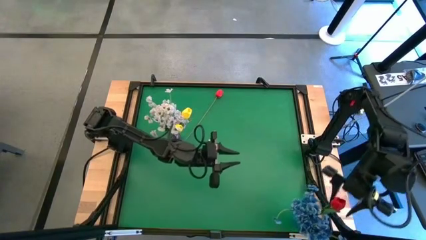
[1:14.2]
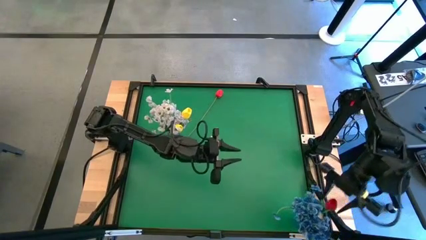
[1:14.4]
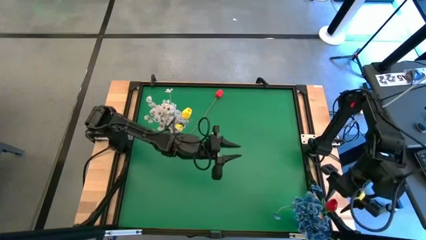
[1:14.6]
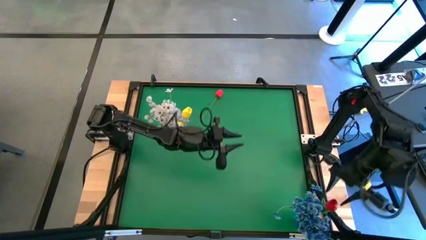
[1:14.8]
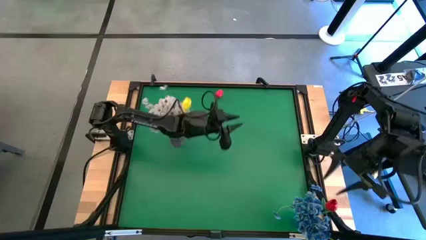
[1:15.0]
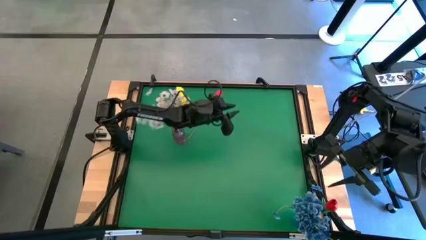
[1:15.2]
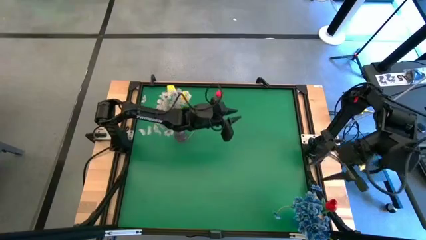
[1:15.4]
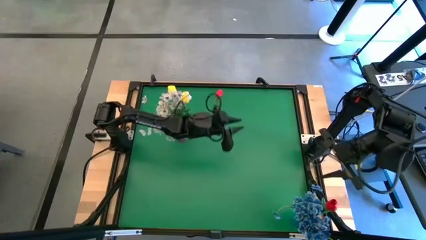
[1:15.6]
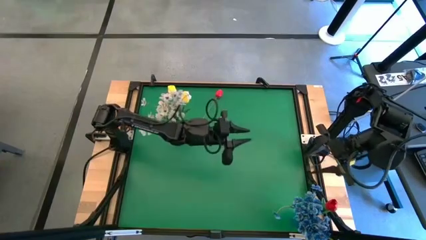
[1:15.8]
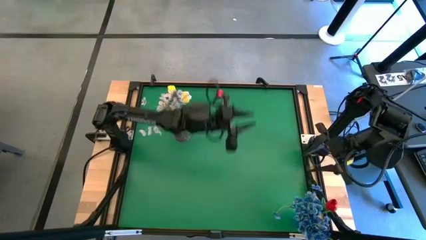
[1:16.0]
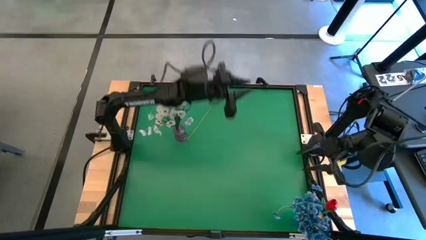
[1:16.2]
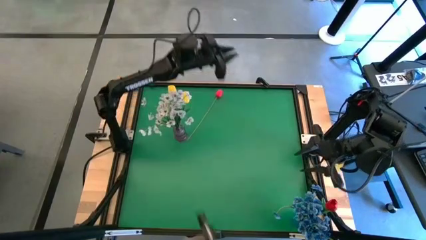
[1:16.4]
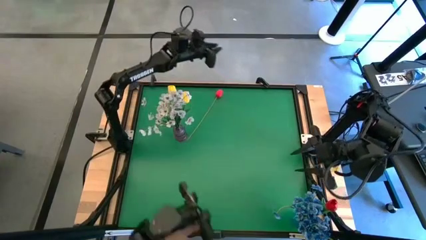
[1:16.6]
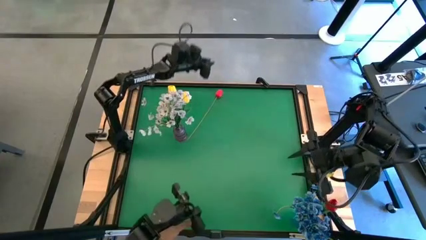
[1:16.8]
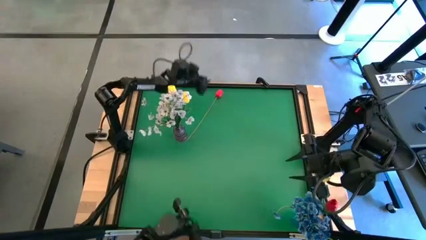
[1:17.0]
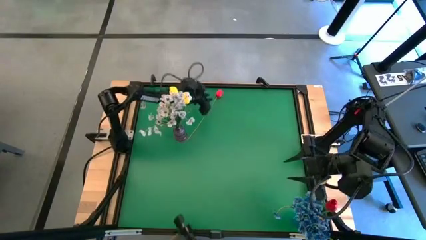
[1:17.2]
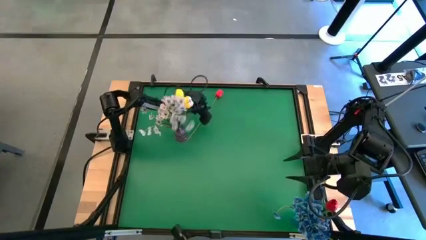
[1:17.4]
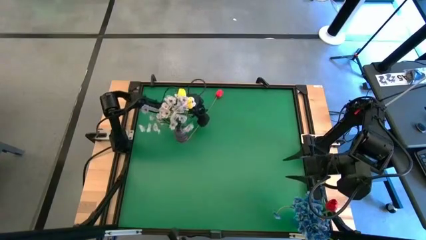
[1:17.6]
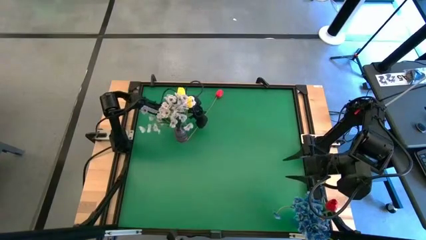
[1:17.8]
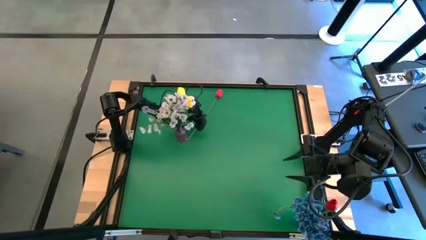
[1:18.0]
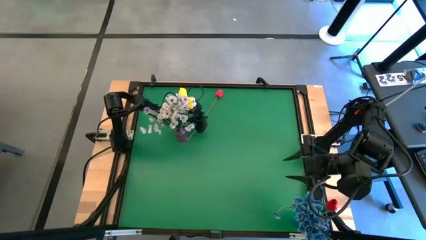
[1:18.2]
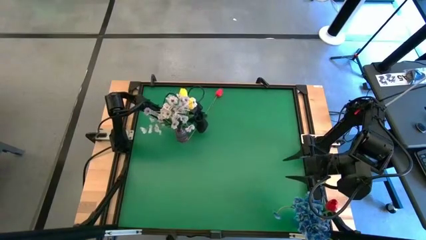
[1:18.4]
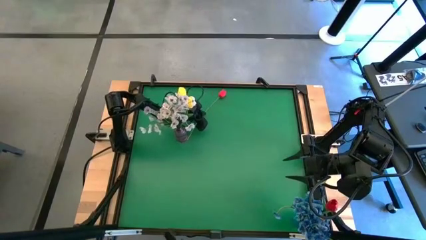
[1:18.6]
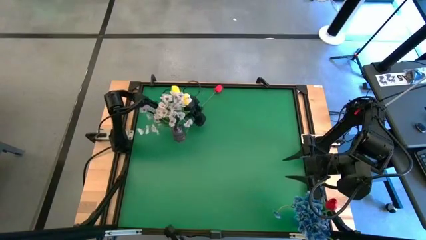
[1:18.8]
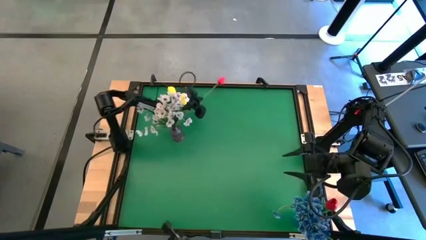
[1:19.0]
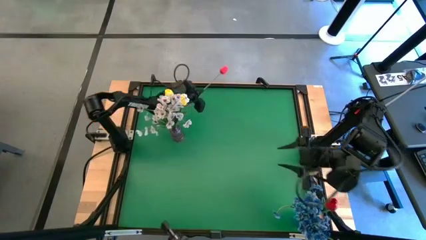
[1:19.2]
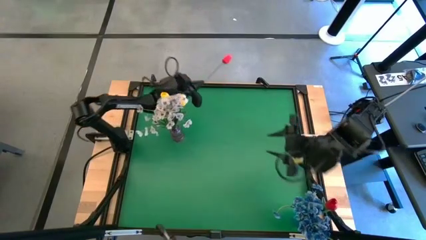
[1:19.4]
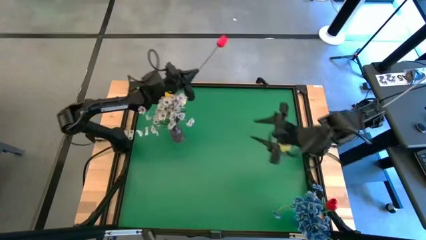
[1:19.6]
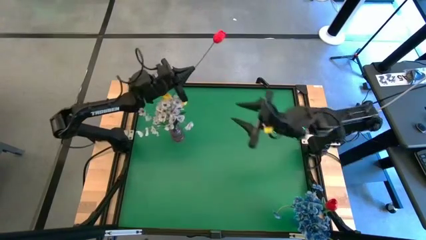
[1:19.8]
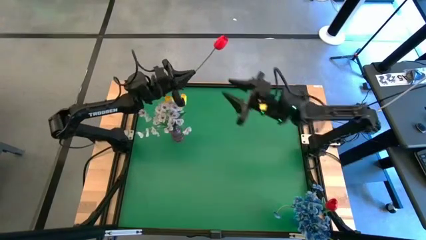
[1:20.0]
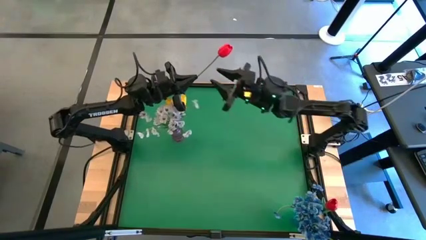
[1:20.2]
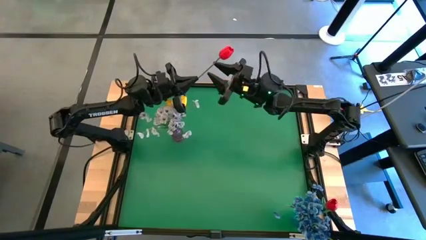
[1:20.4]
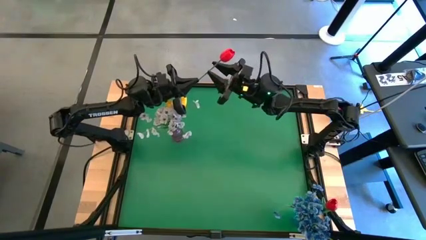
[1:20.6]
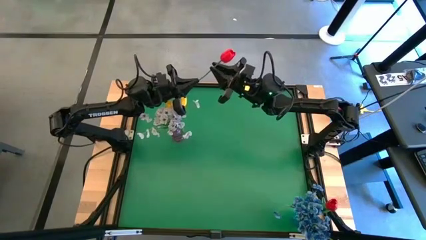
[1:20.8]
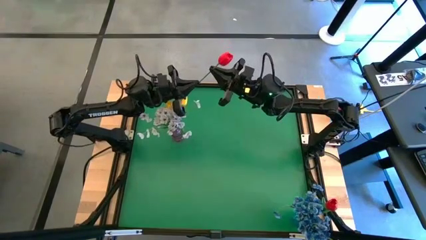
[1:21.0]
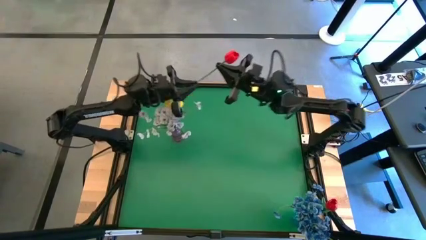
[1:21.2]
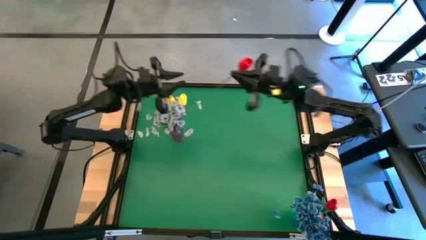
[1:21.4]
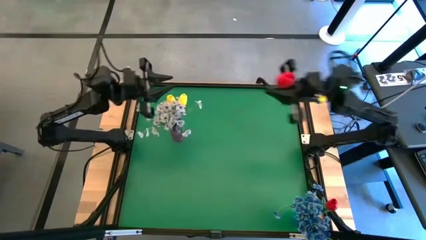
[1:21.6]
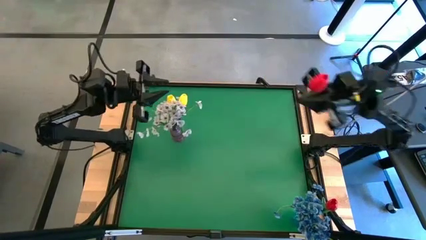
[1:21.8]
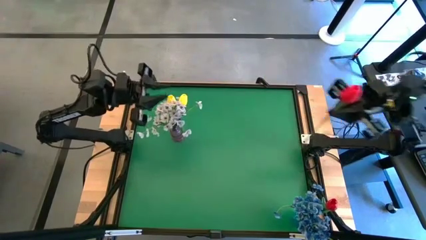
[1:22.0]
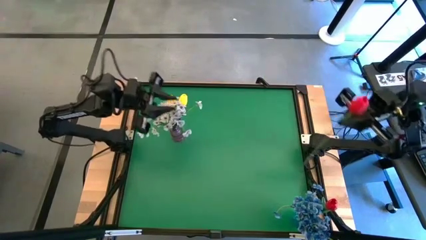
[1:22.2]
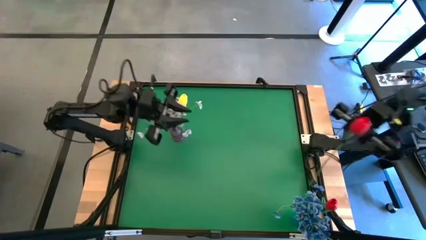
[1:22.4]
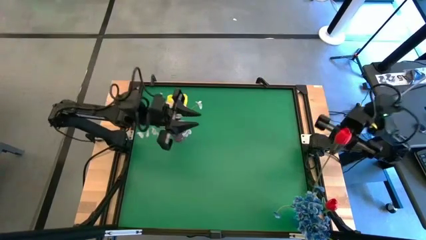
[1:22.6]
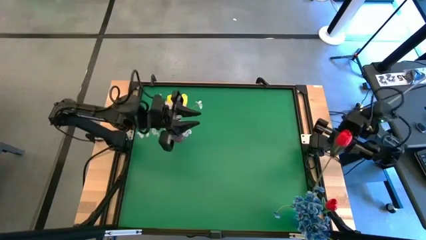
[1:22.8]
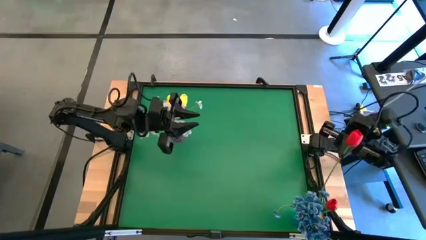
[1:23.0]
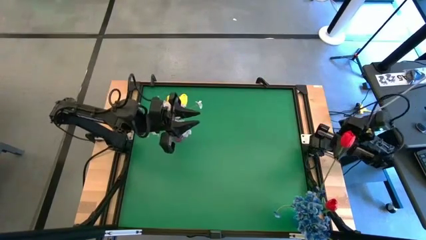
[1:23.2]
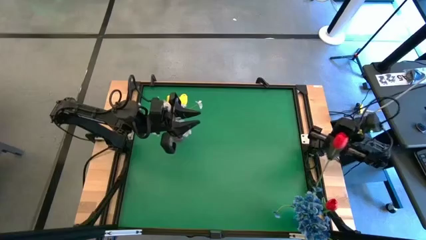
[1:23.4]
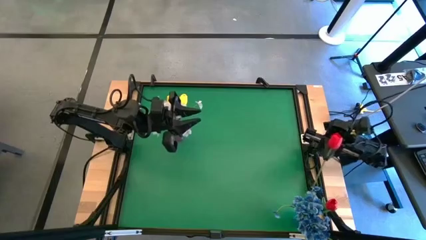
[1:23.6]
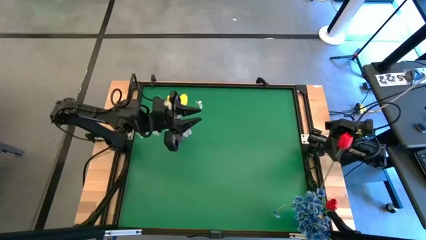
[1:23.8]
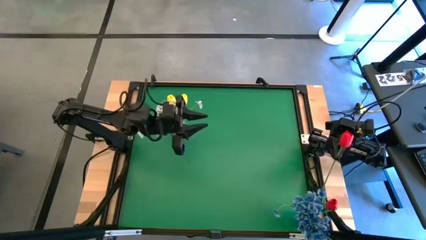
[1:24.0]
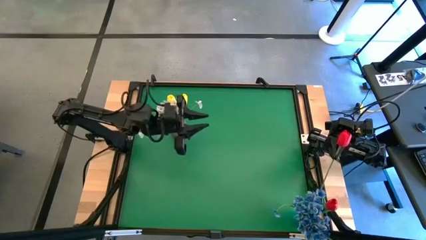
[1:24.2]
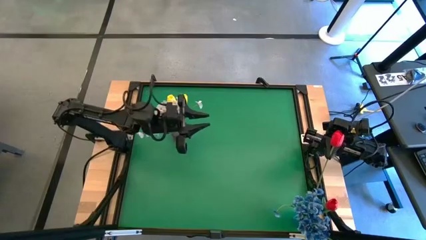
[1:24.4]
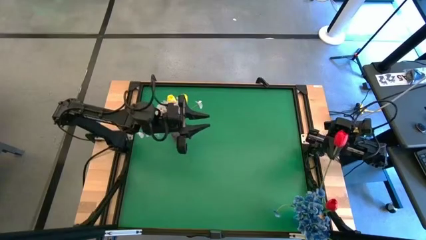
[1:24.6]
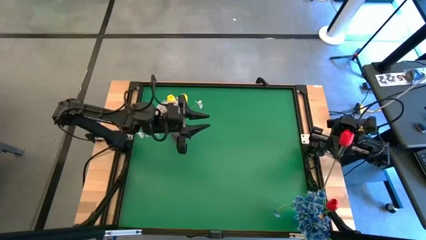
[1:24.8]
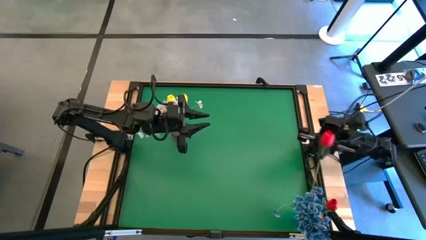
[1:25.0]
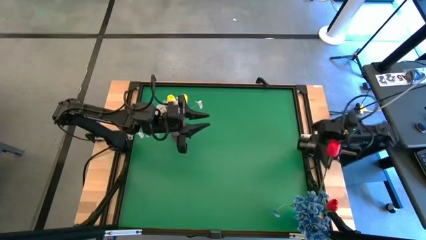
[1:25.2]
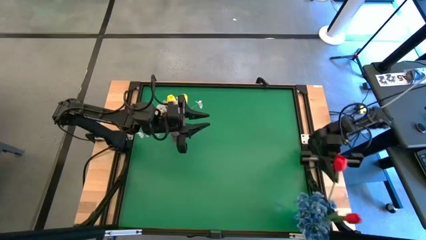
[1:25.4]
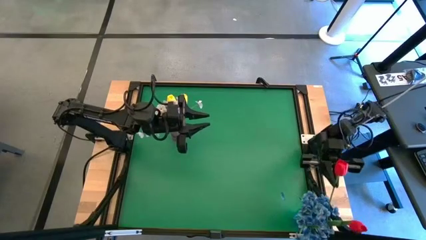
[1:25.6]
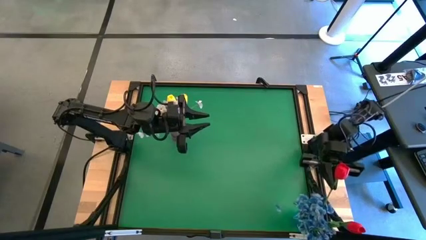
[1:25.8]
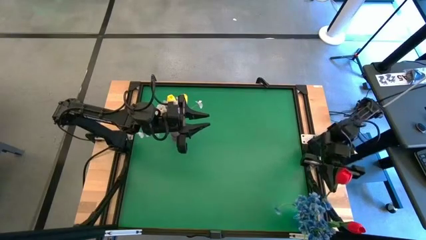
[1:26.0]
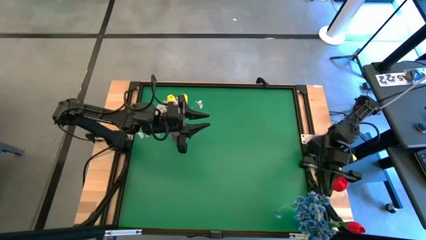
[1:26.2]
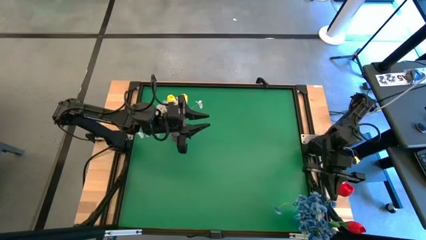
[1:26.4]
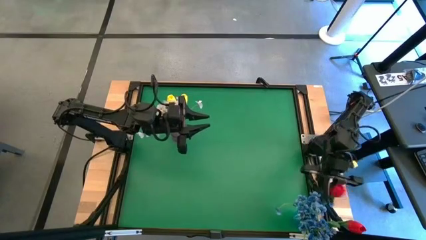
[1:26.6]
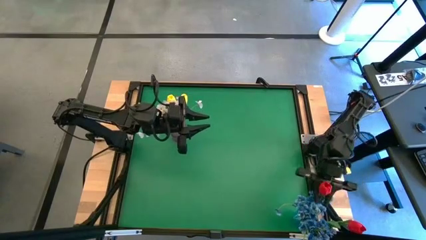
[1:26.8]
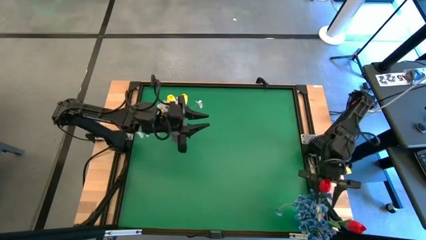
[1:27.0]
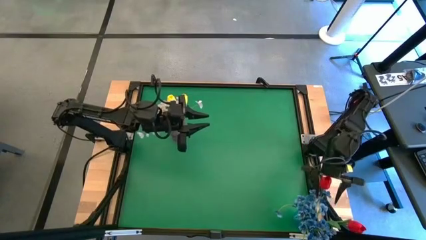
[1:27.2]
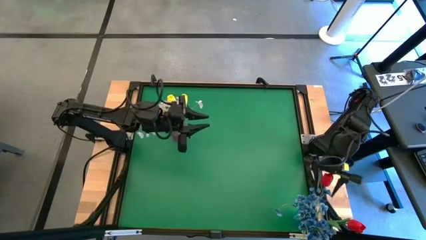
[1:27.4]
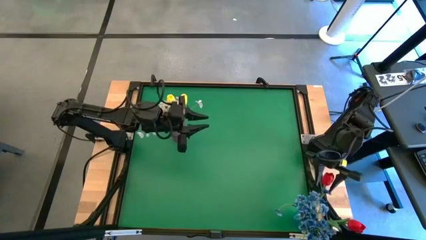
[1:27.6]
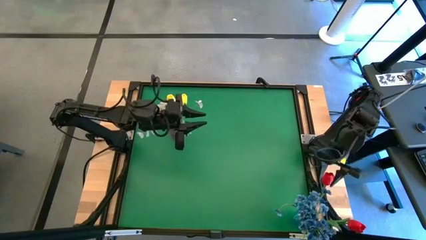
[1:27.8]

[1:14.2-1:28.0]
Task: Sort flowers into vase by color
Put the red flower into the blue vase

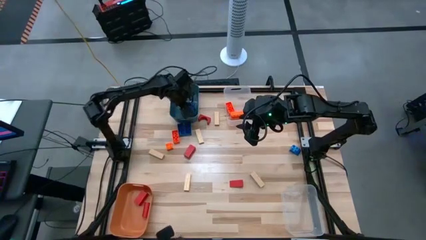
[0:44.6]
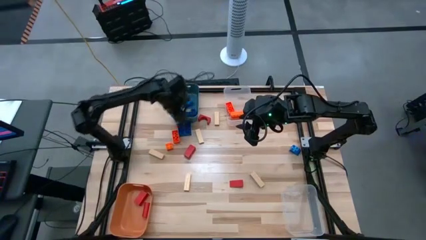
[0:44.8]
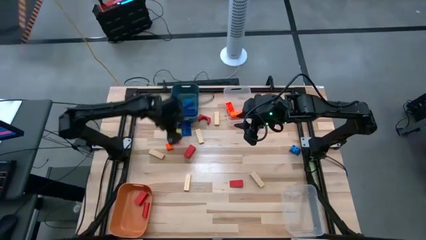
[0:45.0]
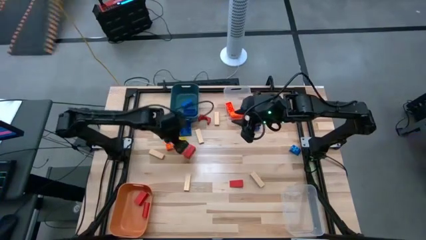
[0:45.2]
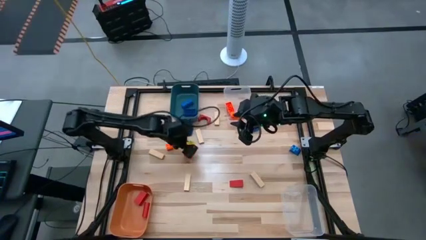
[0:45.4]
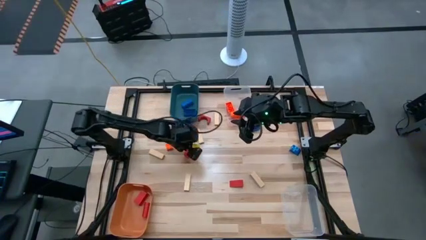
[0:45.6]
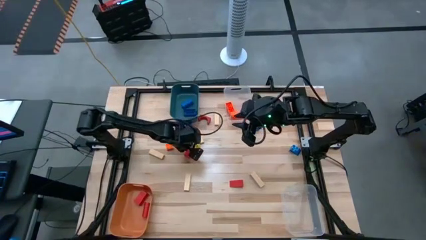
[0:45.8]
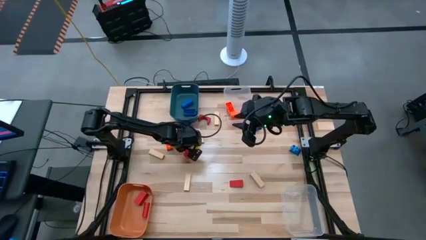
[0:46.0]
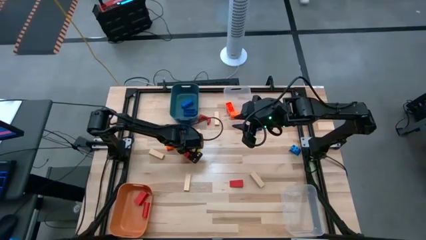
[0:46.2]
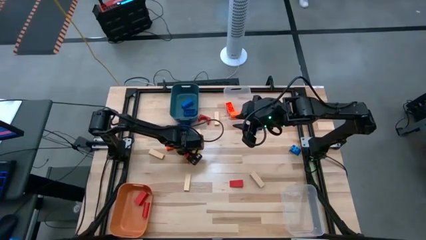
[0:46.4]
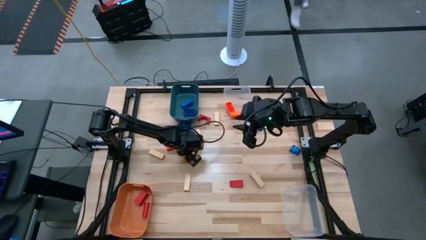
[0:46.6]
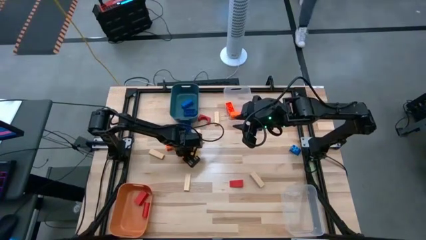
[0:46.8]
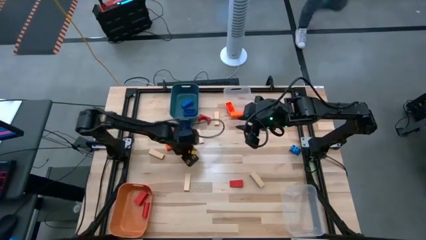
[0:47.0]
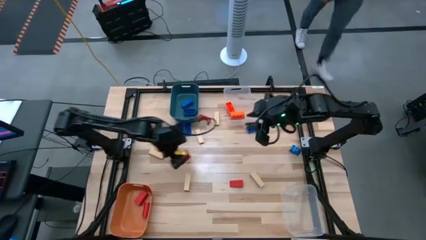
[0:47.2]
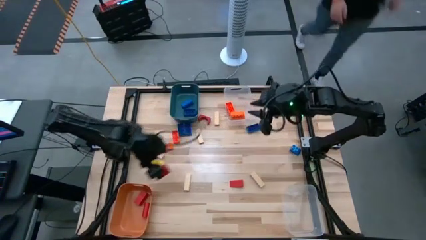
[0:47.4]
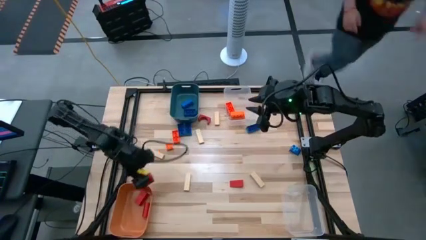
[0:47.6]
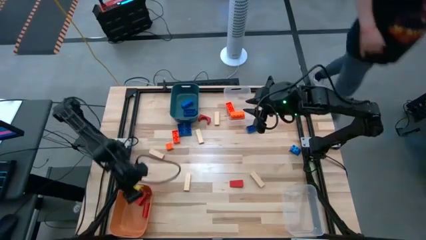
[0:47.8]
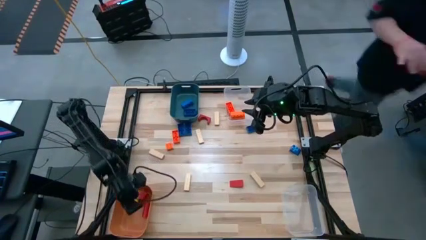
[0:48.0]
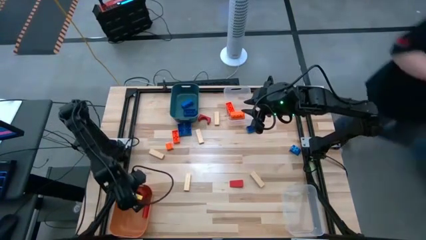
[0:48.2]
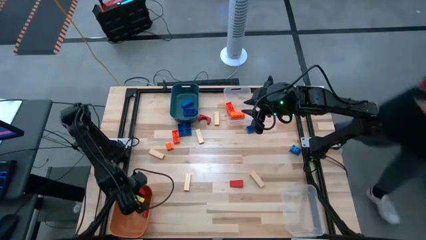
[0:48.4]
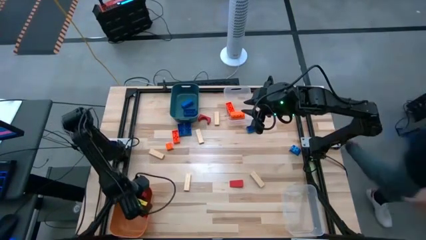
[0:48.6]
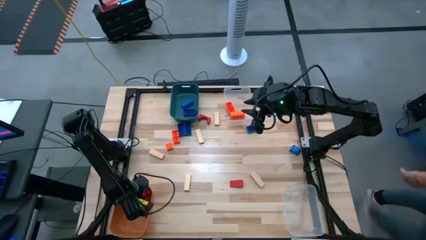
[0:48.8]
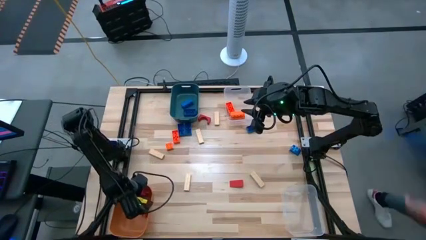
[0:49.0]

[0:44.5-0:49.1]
Task: Sort blocks
Put the red block into the orange bin
